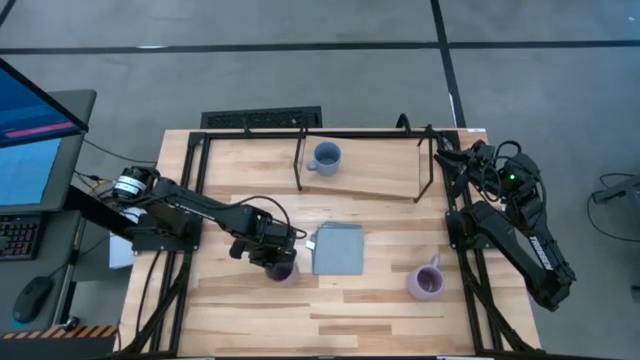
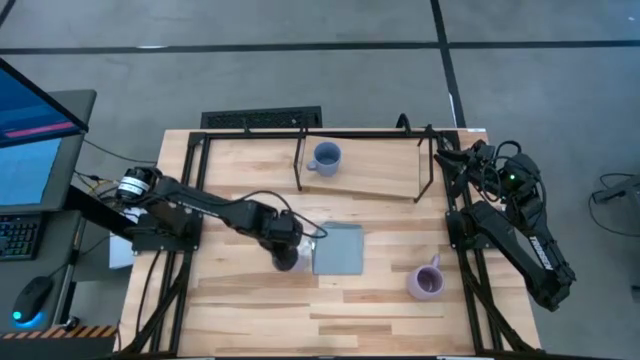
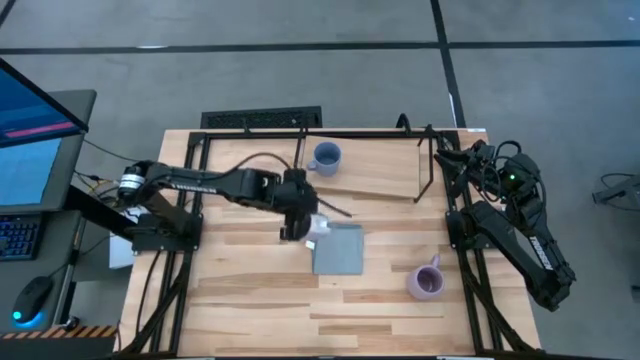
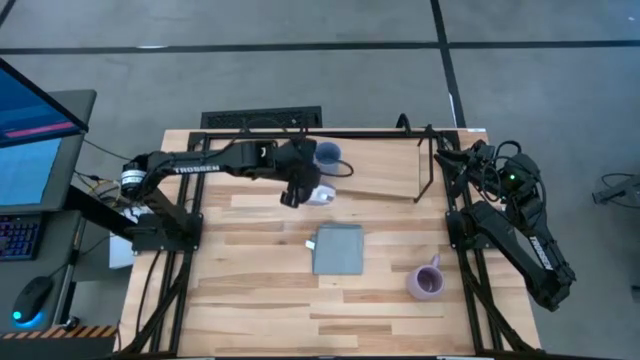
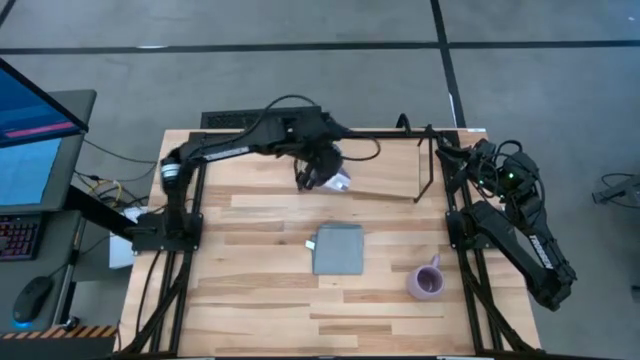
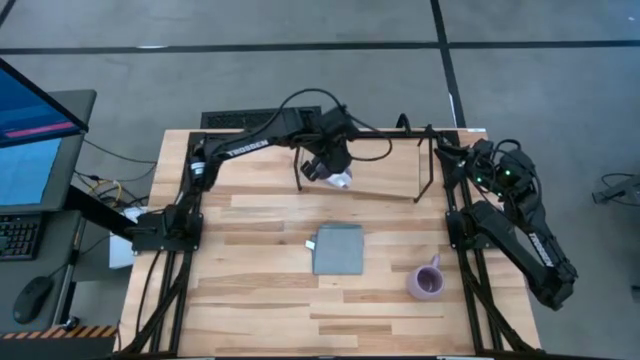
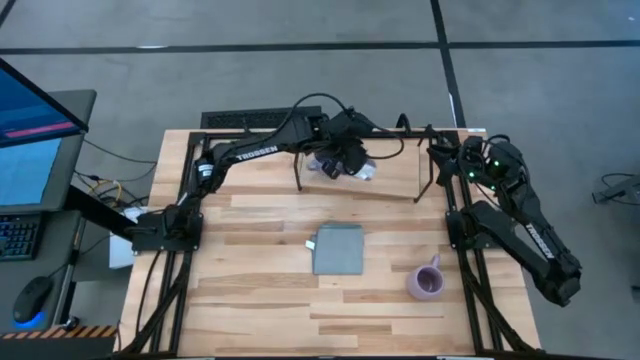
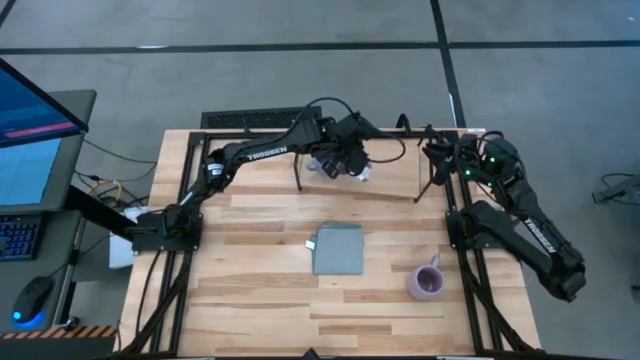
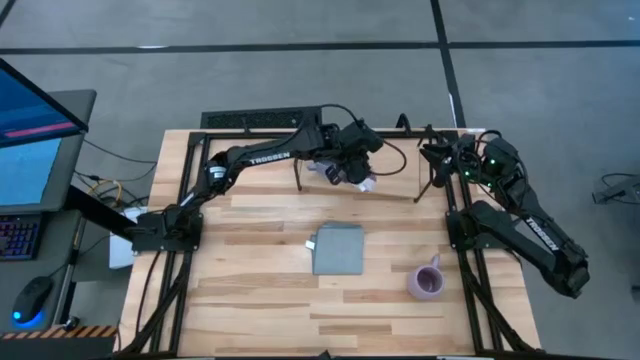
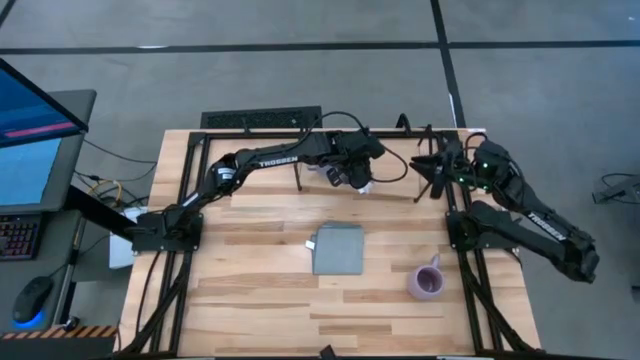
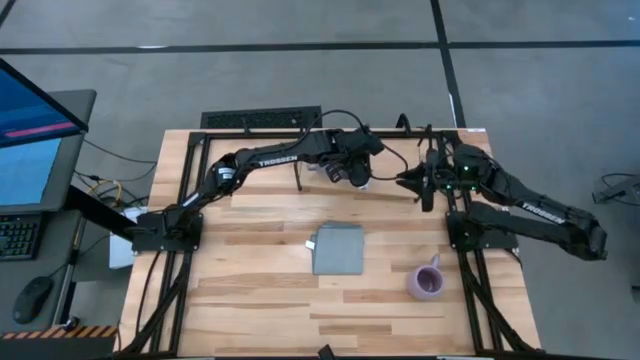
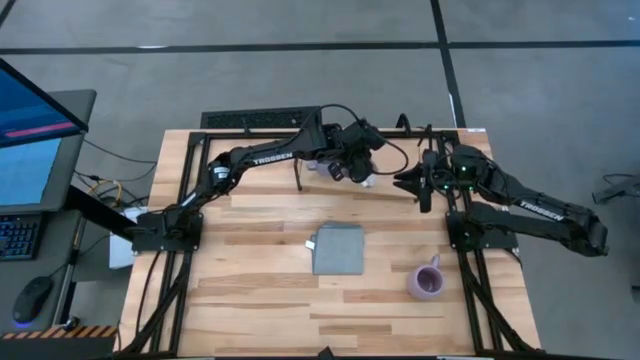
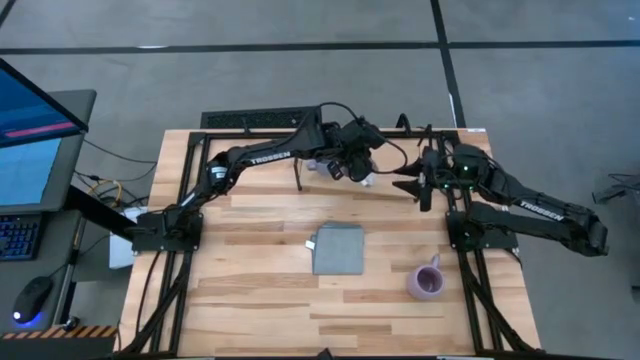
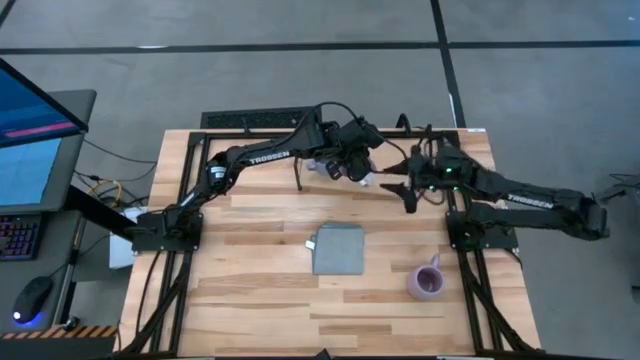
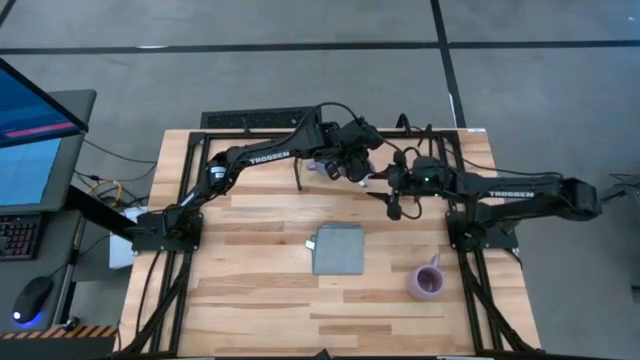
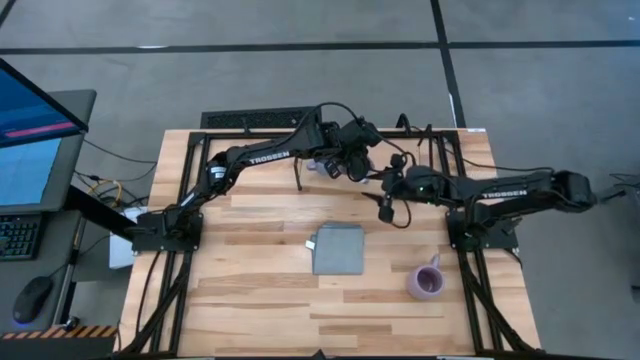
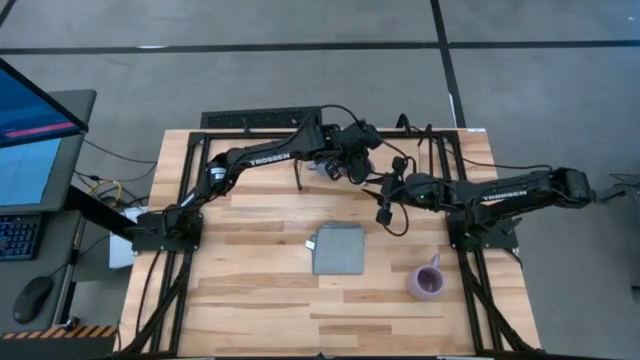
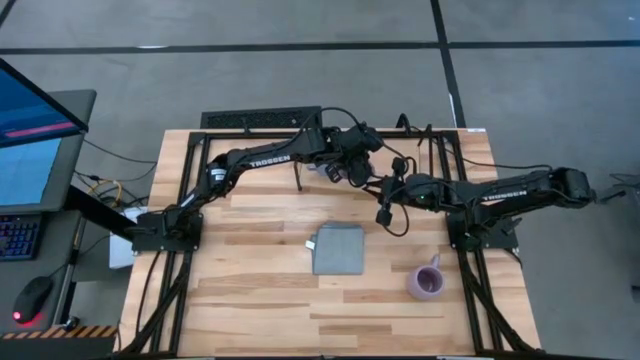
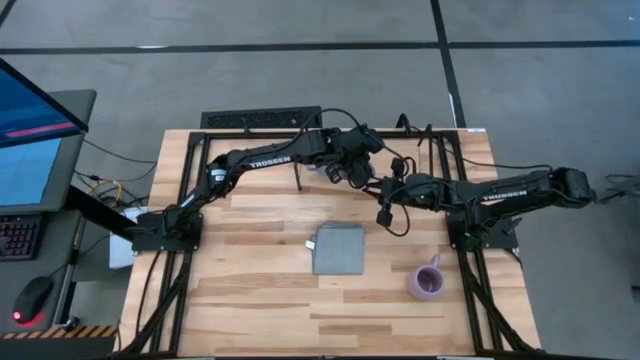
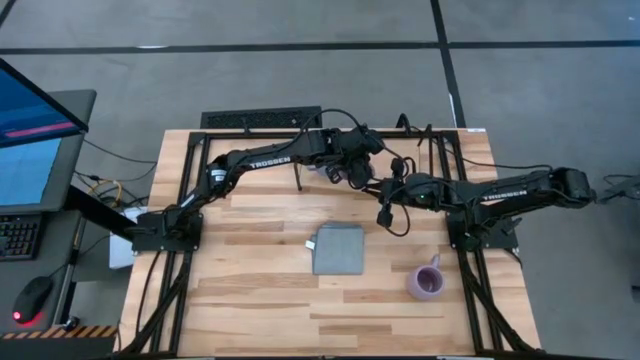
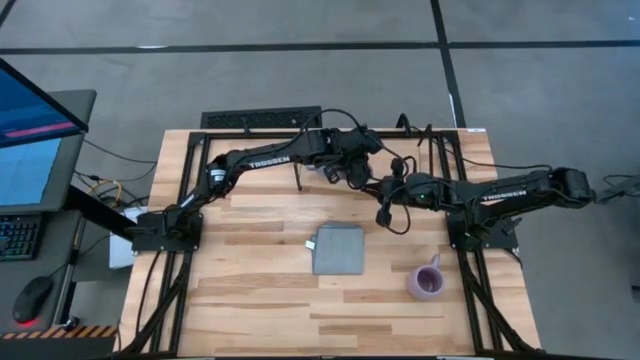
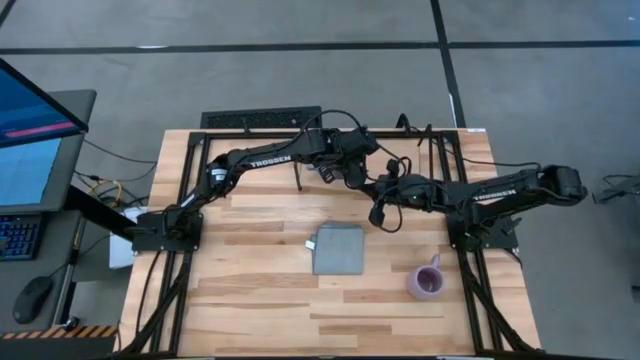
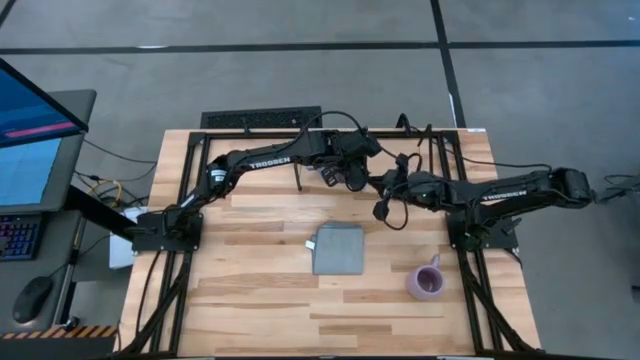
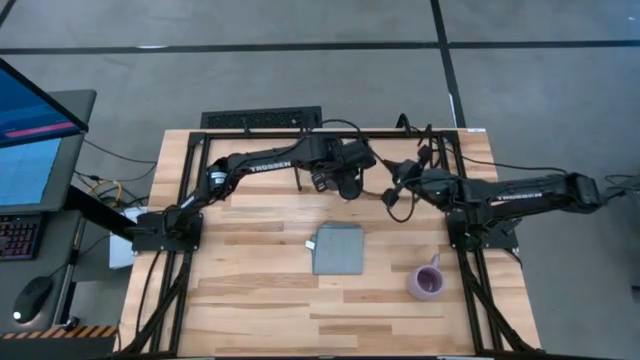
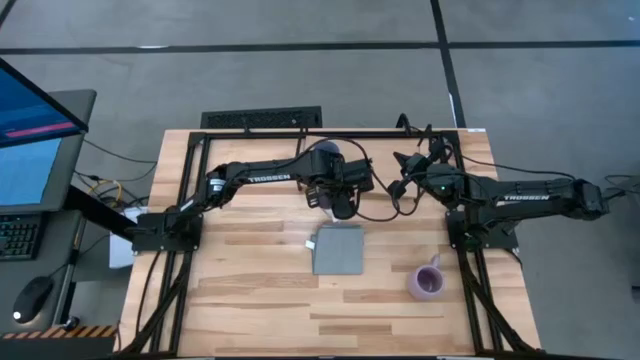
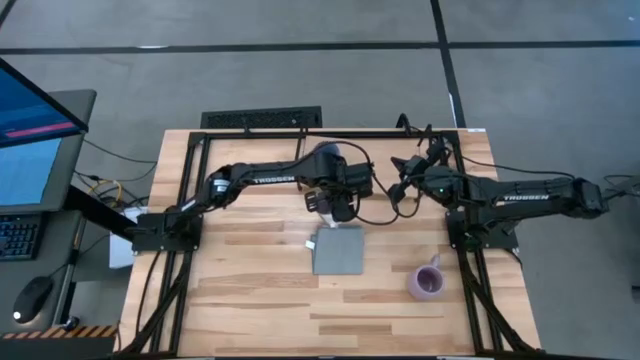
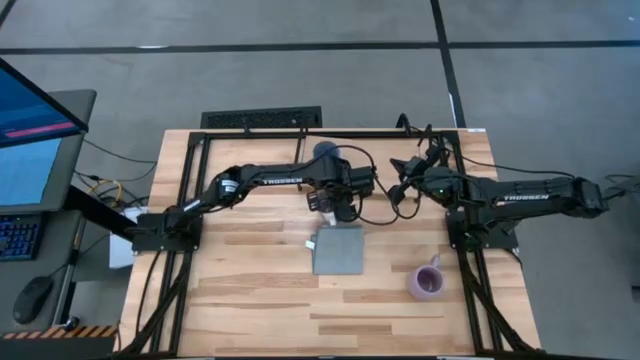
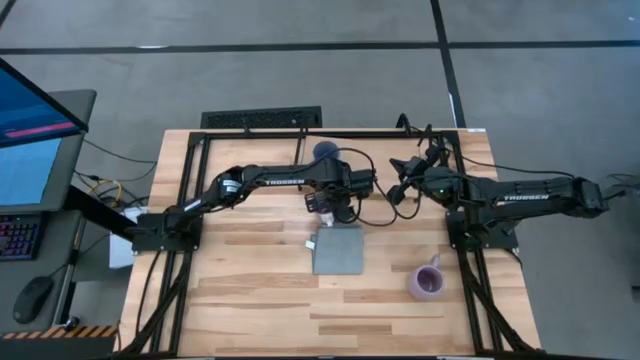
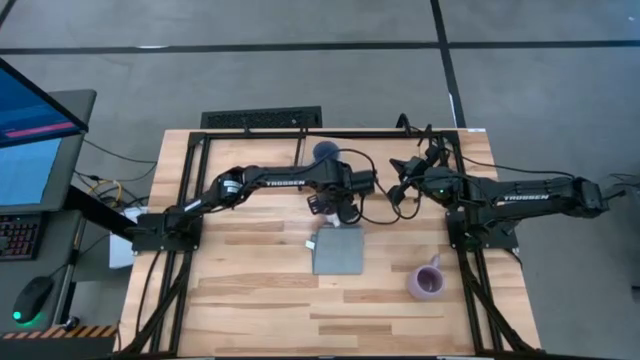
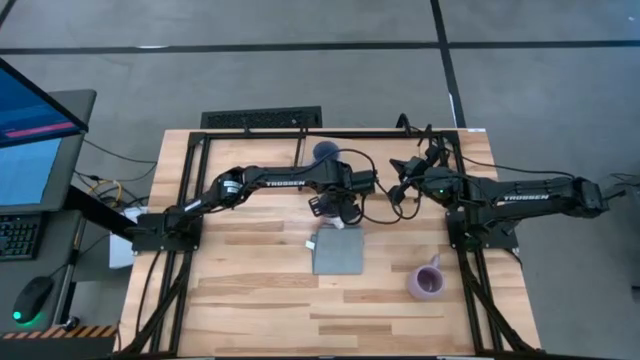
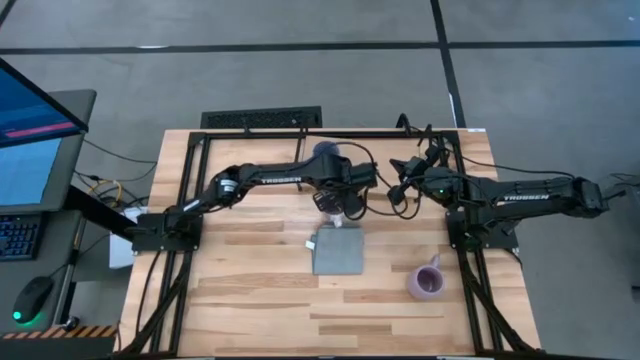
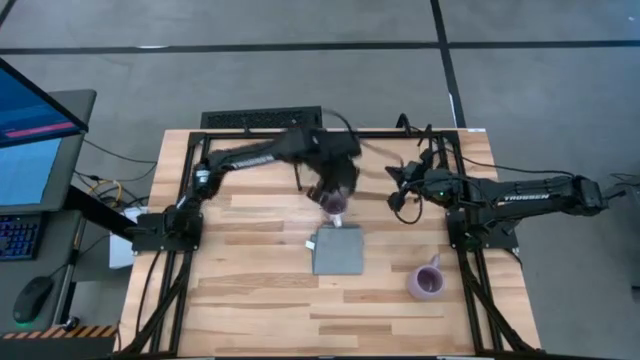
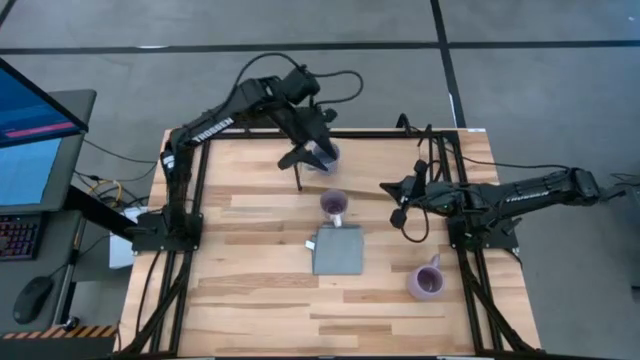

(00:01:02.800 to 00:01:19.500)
Task: Stack small to large cups/mugs on shelf
Put the left violet cup on the shelf

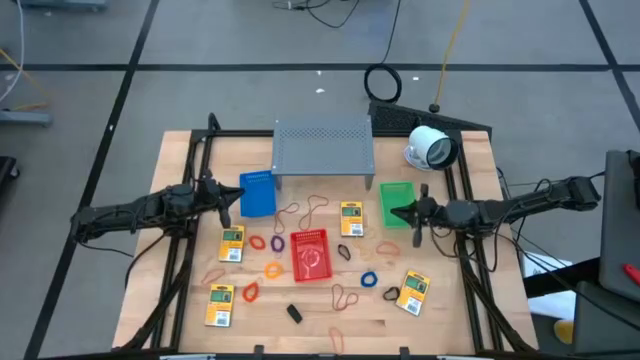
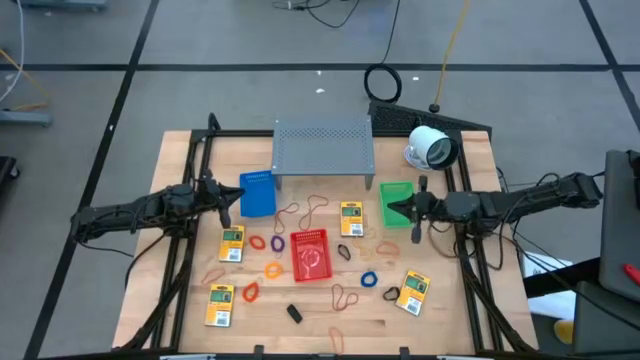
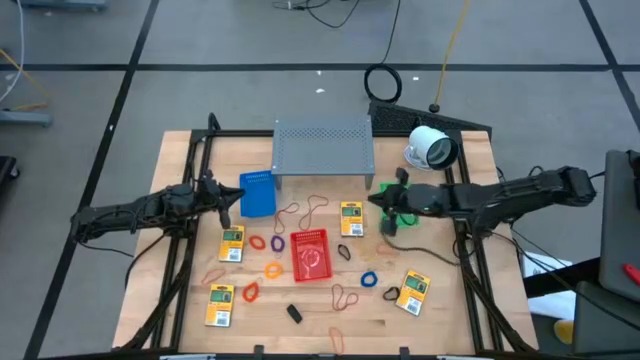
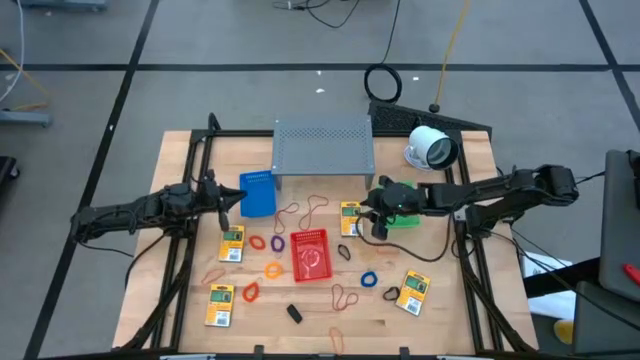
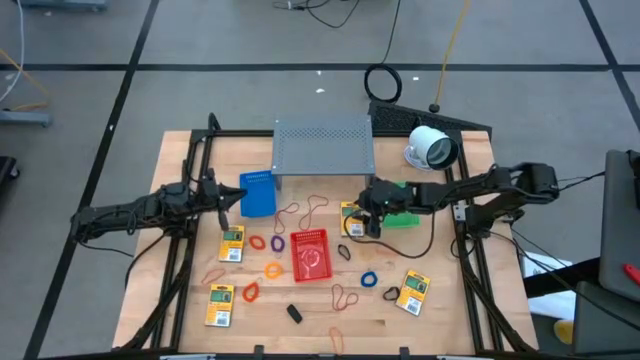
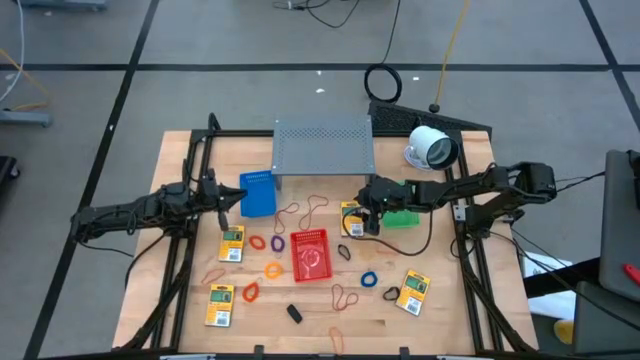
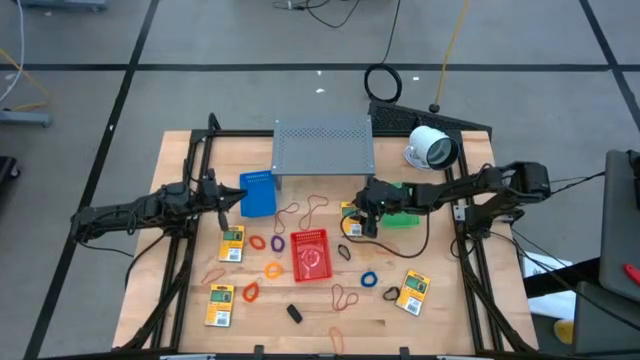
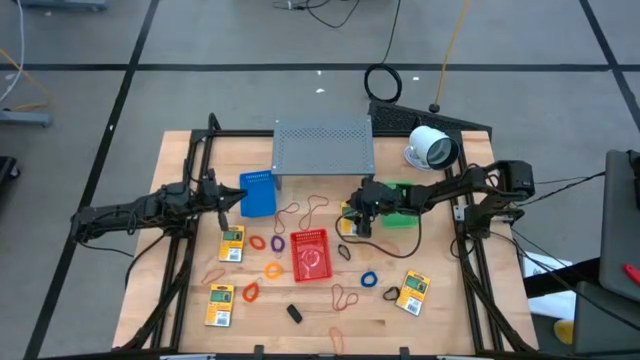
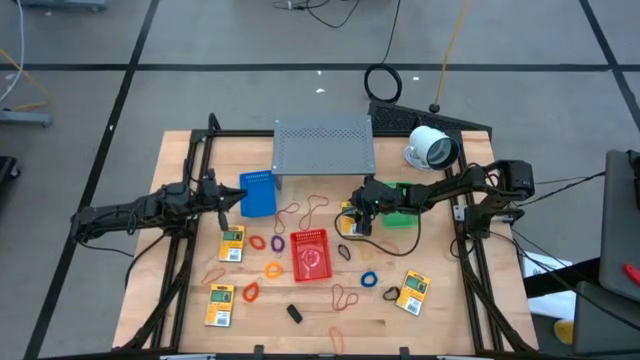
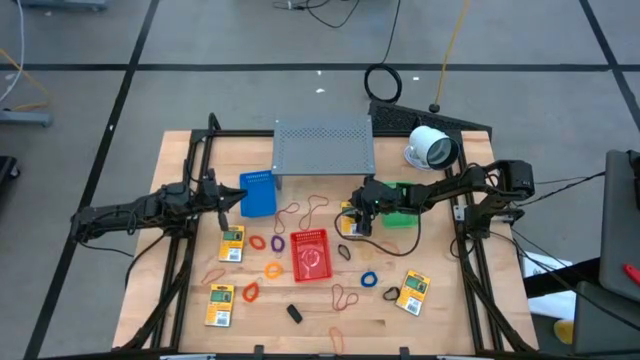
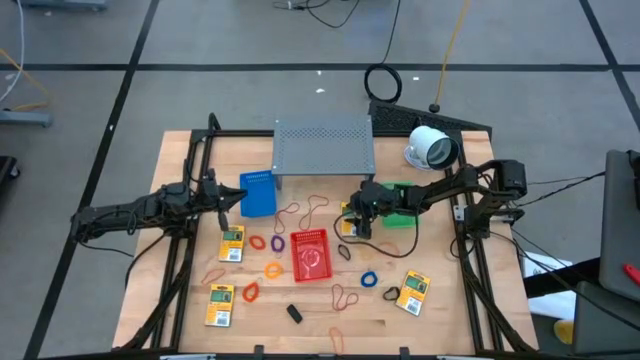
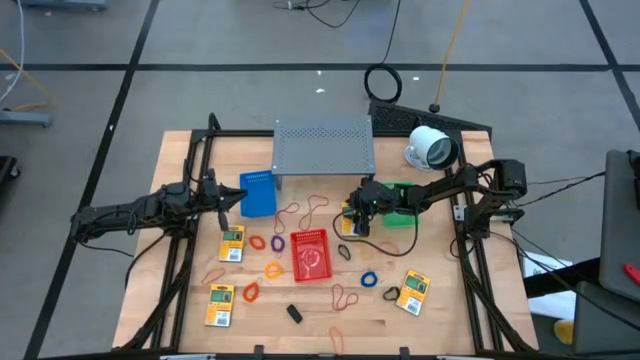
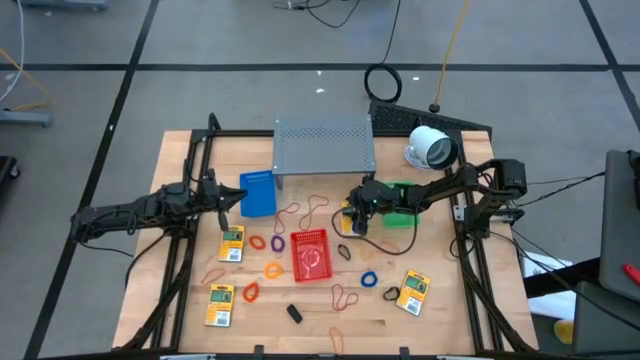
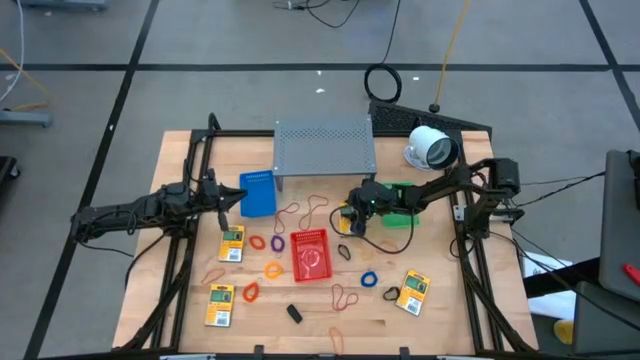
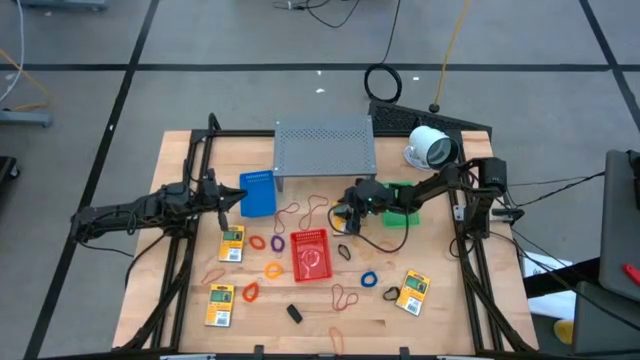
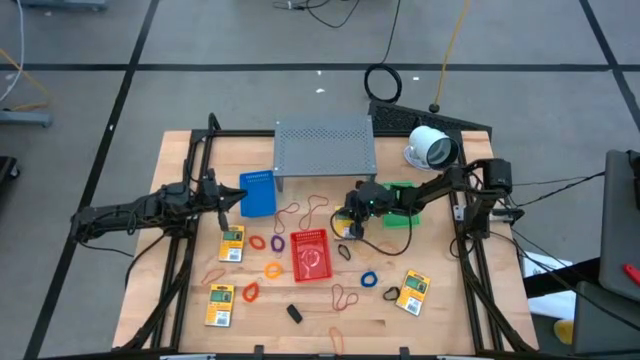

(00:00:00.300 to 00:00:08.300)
Task: Pick & Place Office Desk Supplies
Put the yellow crayon box into the red bin
